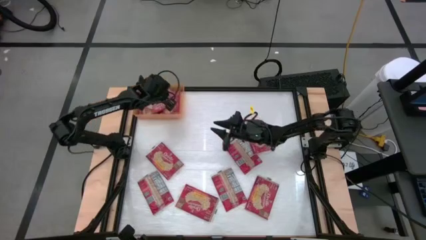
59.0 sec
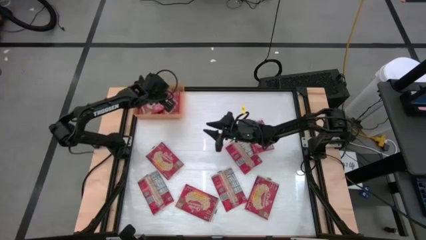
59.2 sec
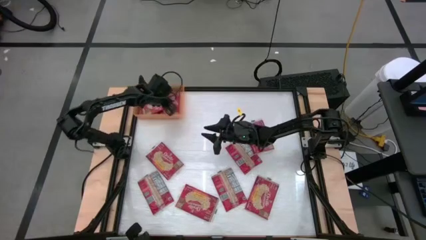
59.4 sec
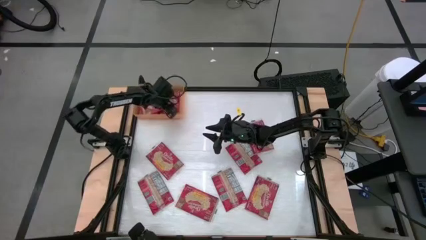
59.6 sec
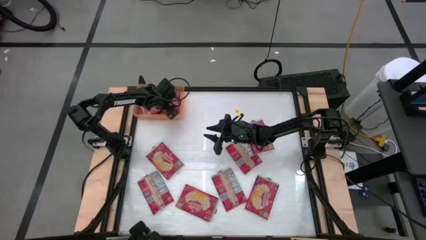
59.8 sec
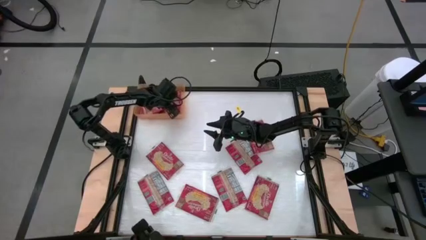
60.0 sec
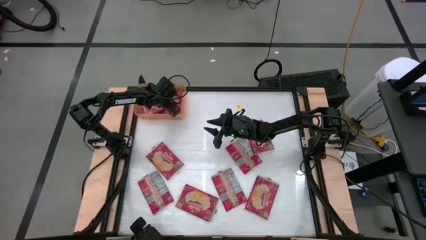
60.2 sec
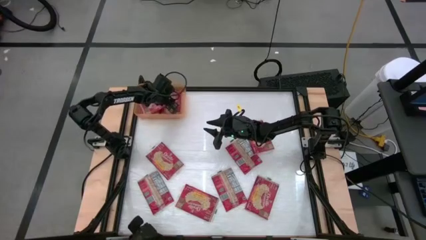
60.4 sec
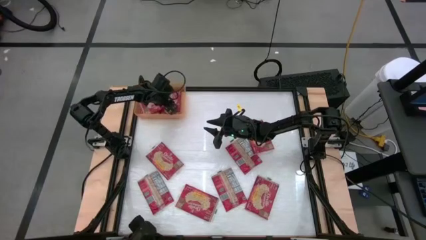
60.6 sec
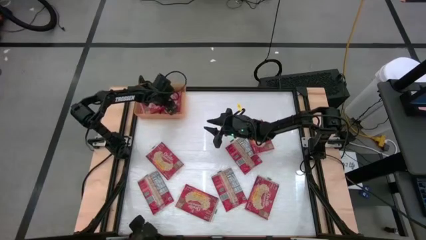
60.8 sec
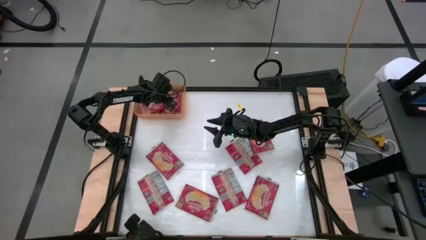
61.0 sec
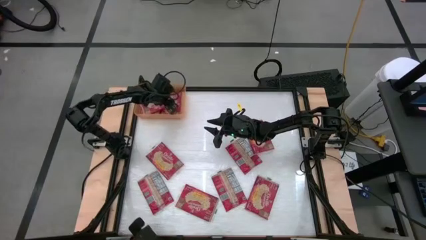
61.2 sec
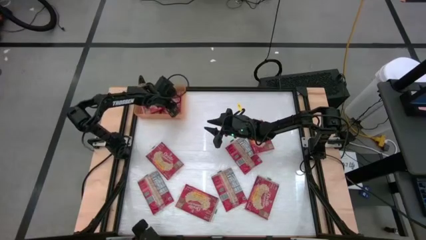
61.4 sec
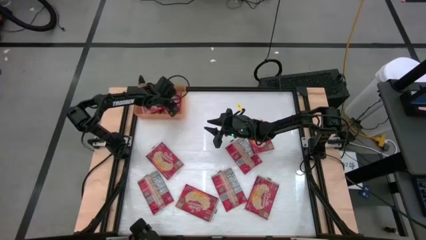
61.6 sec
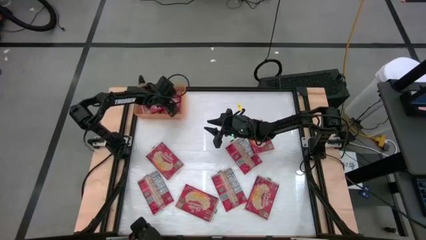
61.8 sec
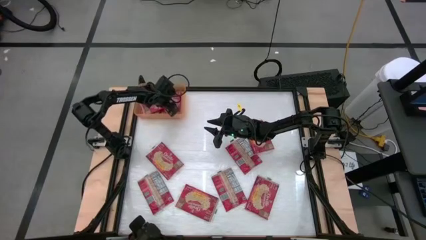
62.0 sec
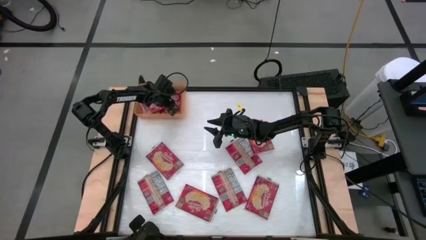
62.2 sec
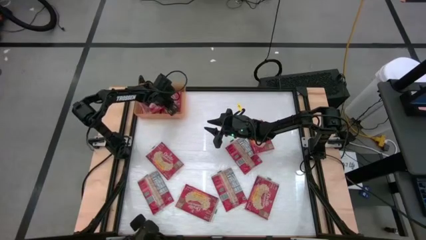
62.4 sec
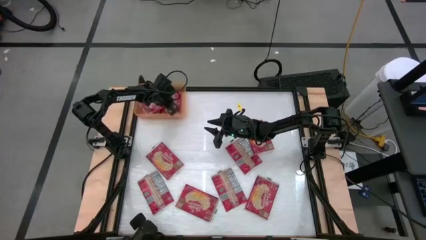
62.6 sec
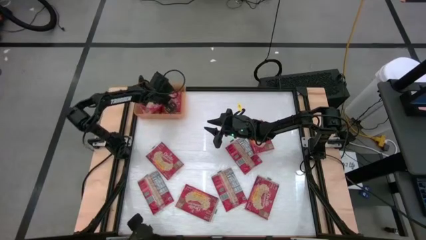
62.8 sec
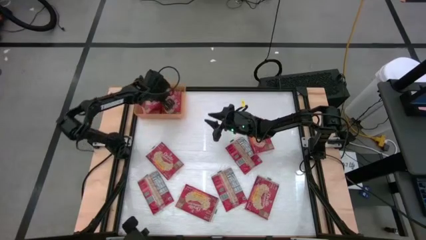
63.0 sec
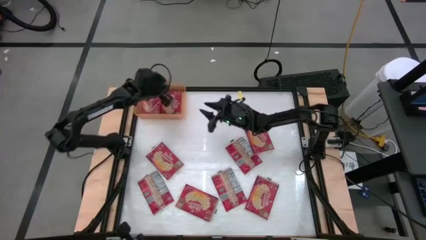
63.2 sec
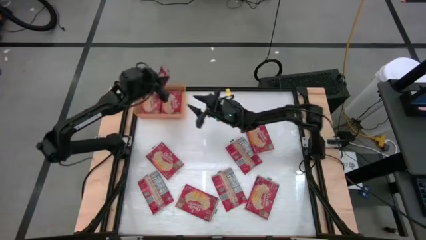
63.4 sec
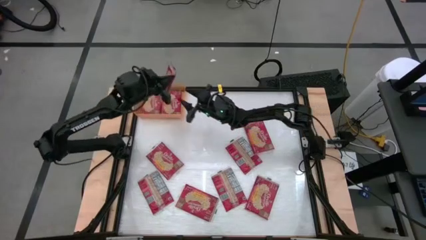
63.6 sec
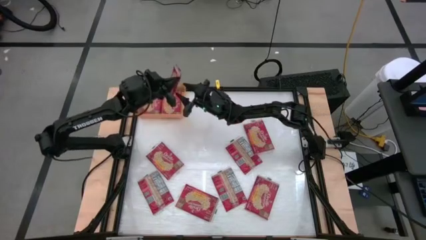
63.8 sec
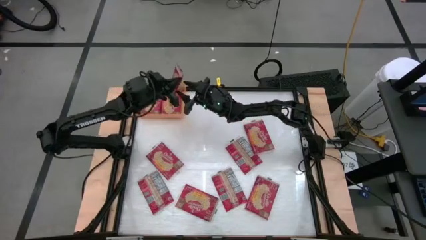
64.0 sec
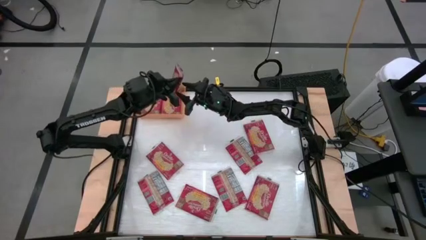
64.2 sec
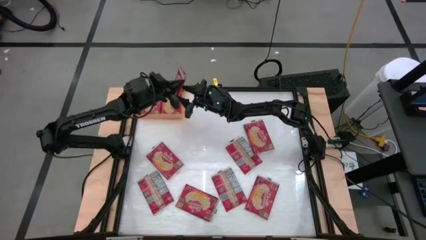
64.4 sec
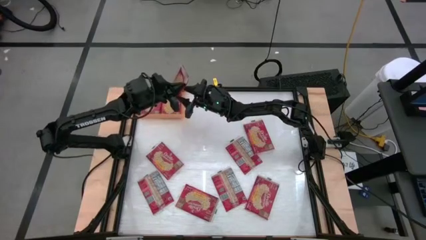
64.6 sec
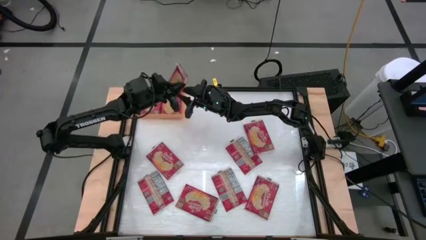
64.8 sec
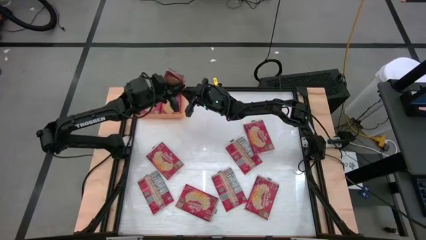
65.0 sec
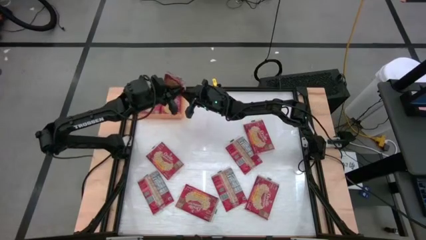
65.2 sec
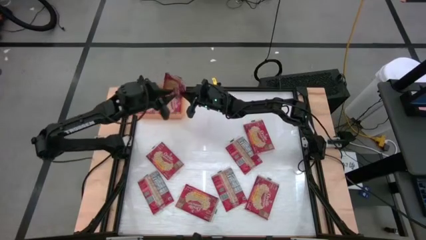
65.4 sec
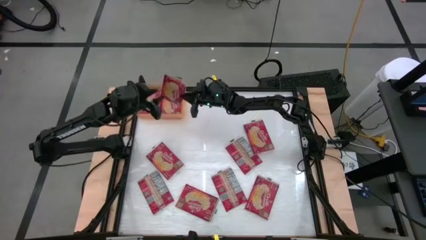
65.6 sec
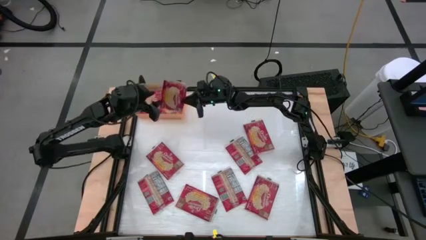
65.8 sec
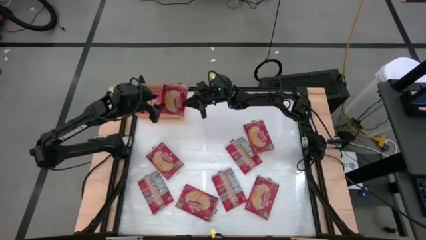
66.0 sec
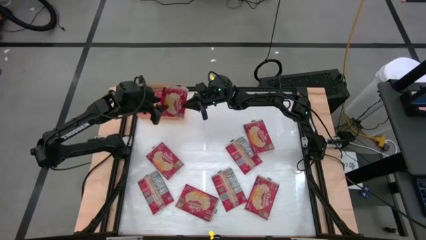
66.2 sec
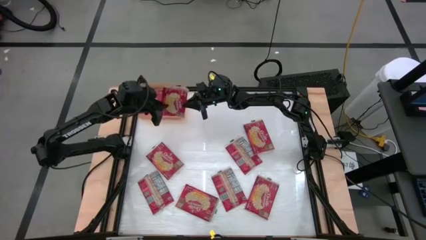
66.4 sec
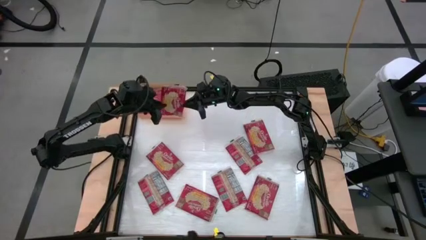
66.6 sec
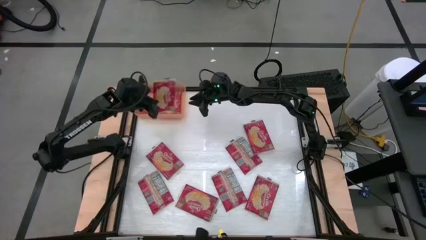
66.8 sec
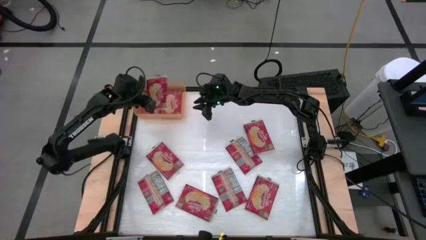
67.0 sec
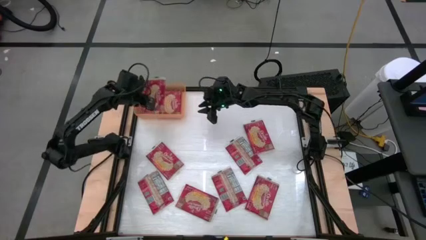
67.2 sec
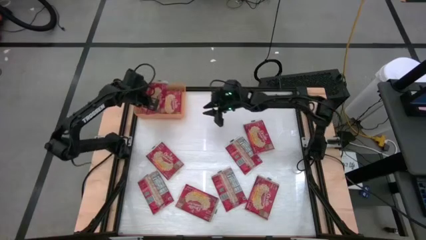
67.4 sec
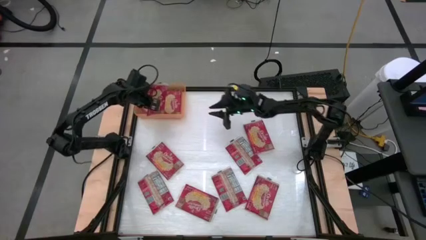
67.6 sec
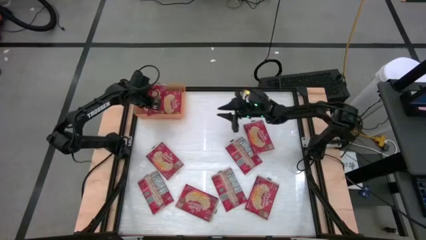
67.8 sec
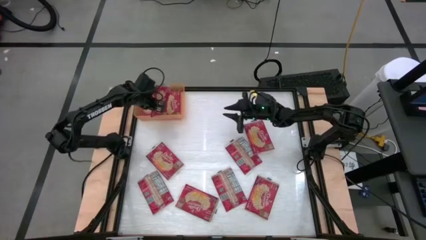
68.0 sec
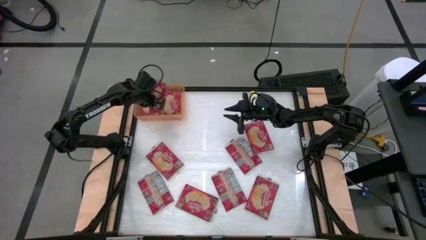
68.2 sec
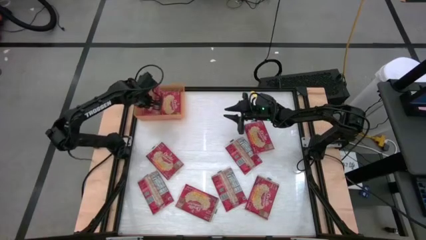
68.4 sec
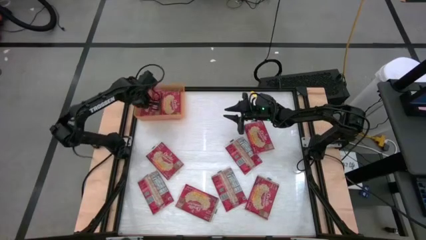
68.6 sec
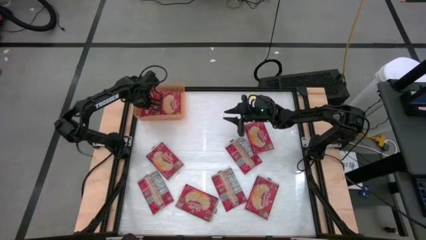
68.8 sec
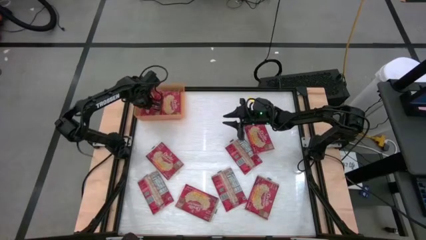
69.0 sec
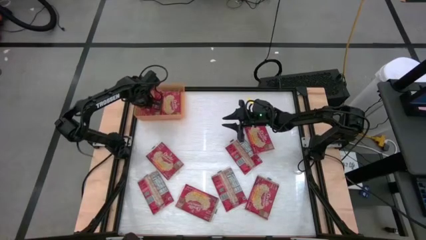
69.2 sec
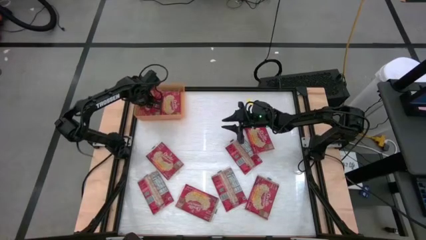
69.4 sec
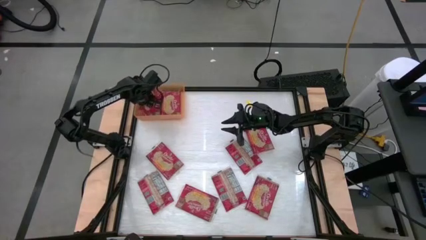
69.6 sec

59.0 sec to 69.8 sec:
Task: Sort popcorn bags into baskets
Adjust the red popcorn bag in the orange bin

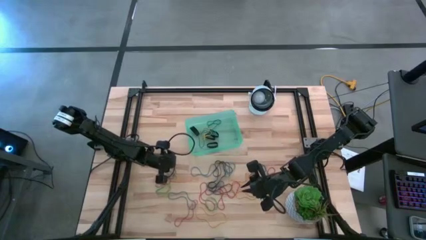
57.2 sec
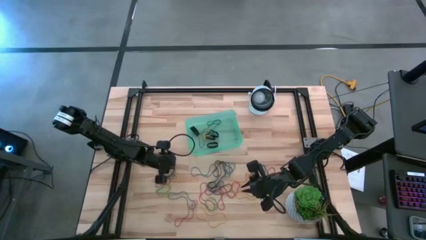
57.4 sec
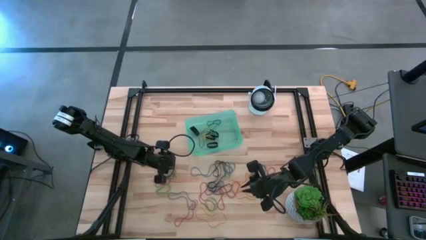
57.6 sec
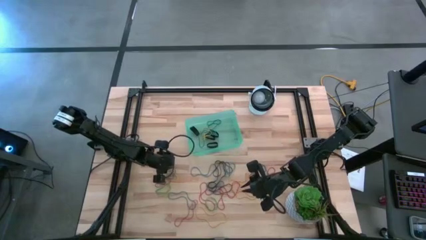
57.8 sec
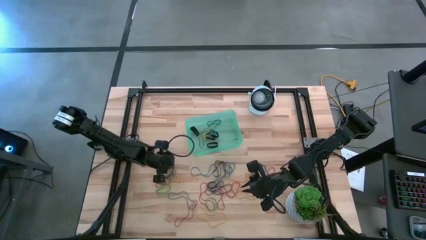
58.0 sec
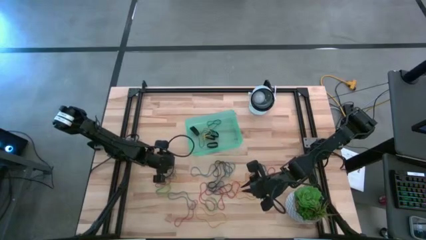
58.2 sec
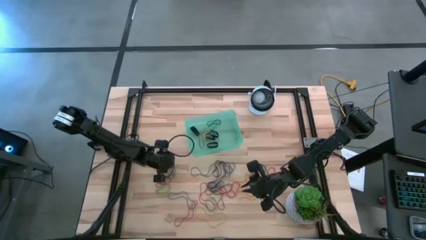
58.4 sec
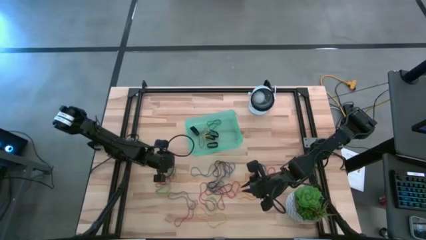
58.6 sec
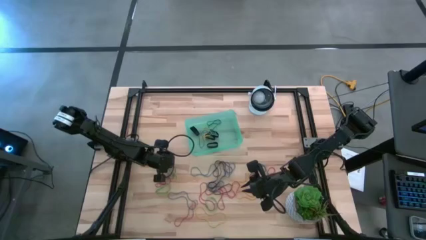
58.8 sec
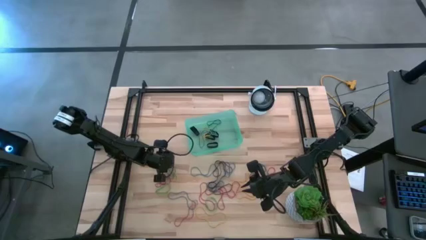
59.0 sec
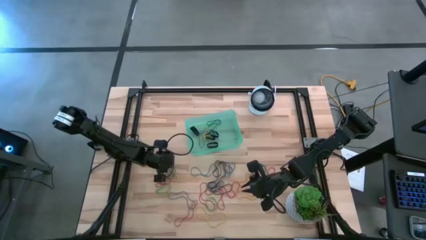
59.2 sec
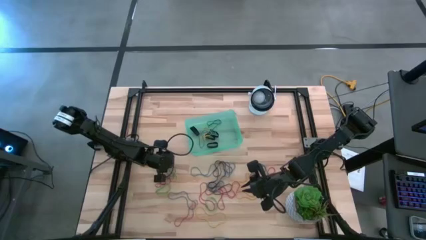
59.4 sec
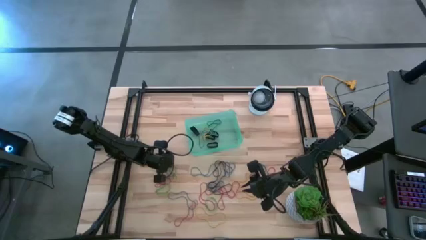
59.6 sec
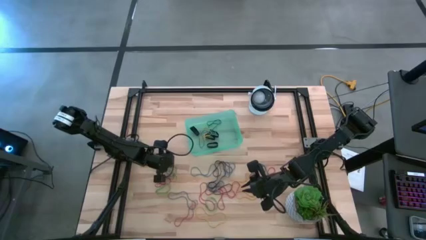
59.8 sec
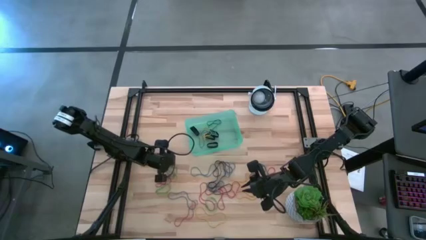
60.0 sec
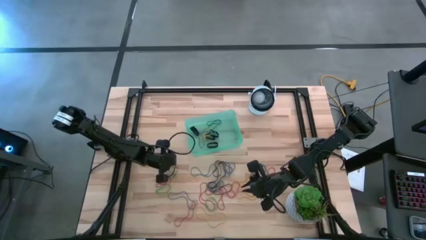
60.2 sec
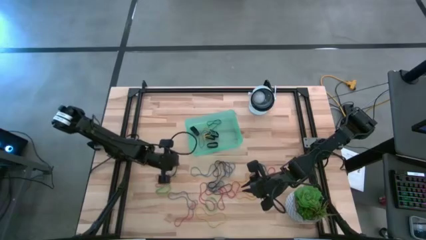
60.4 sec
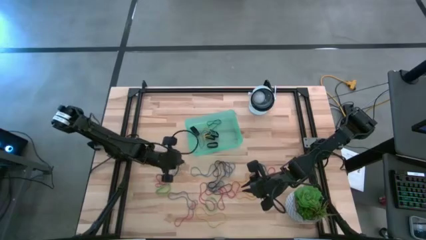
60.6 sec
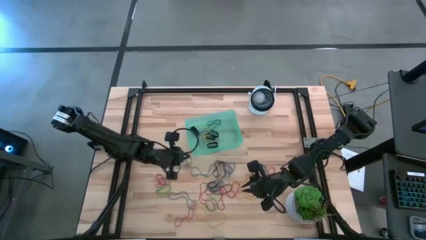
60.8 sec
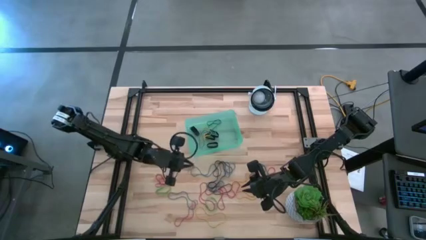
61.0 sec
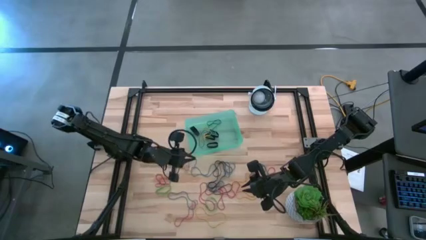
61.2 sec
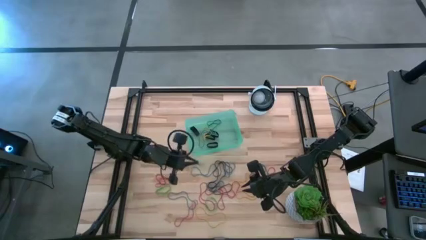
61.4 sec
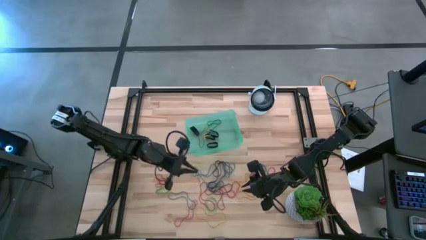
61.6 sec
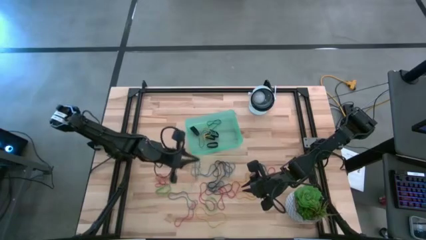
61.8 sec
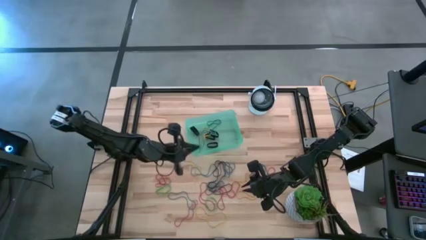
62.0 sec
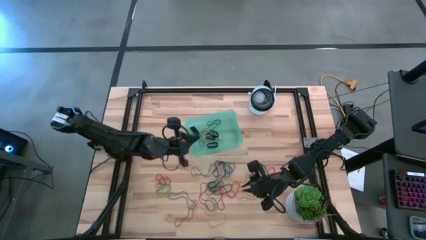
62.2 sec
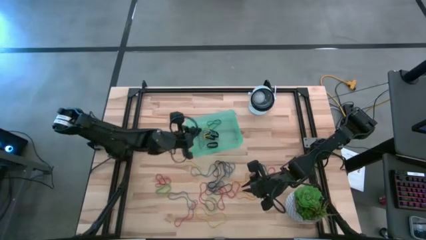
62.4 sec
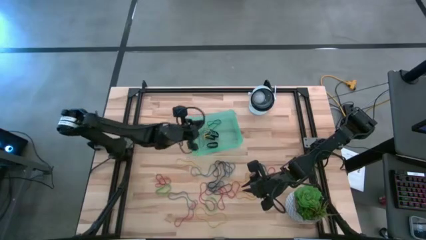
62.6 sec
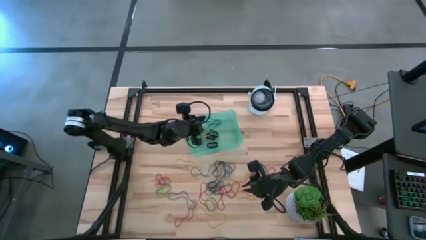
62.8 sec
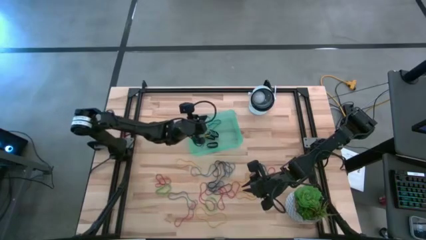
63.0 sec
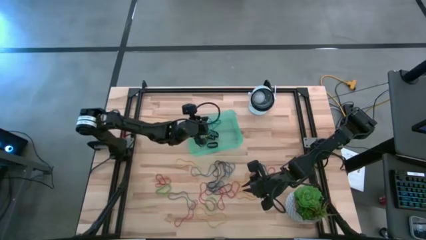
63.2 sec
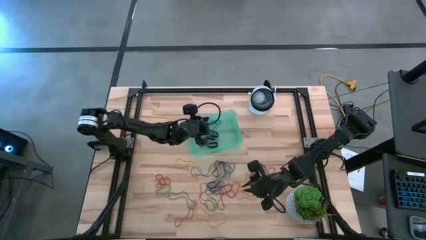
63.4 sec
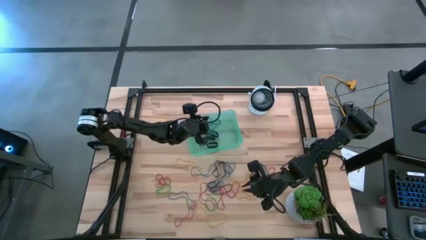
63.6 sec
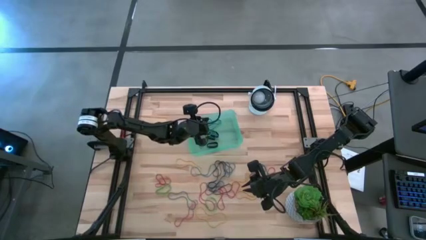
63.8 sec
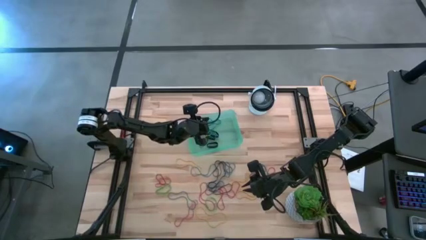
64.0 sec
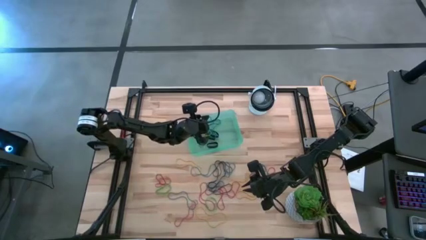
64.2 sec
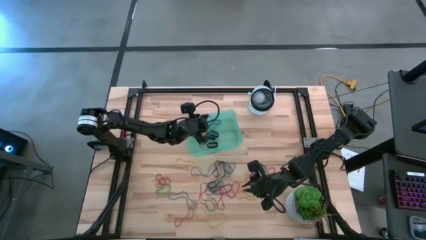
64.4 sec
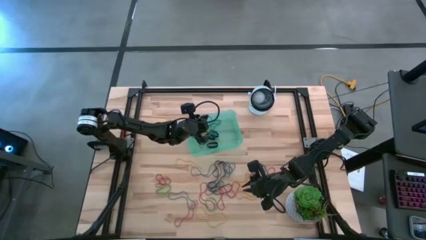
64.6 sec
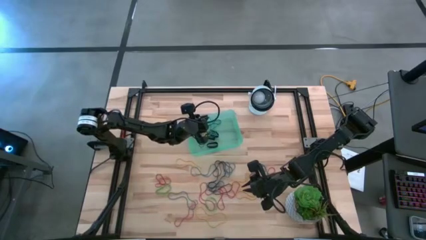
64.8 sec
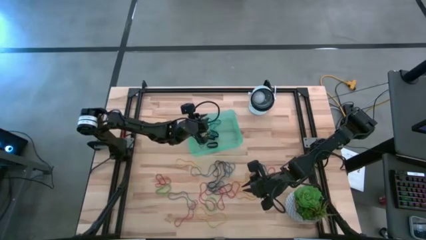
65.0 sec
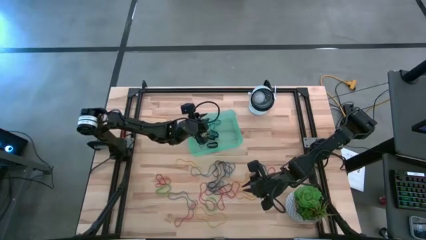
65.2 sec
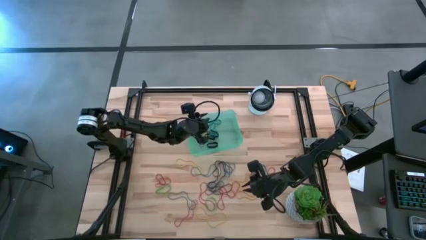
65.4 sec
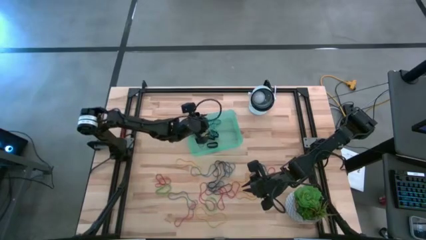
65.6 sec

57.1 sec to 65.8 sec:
Task: Pick and place rubber bands into bin
Put the blue rubber band into the green bin
